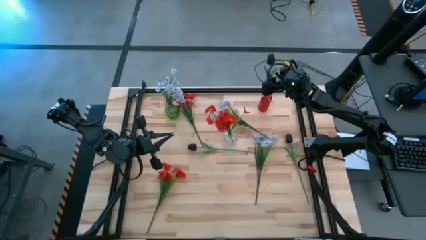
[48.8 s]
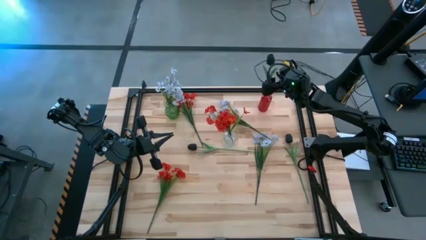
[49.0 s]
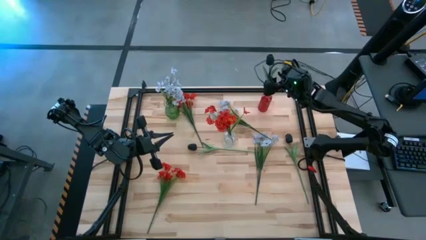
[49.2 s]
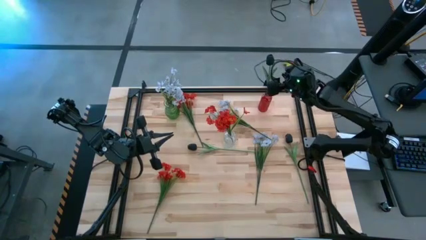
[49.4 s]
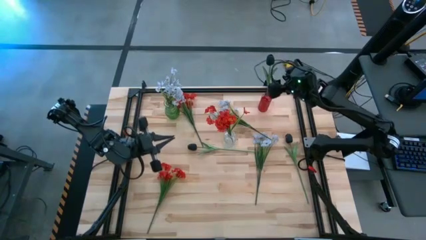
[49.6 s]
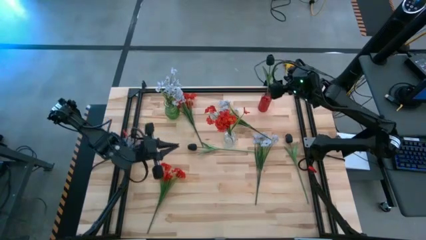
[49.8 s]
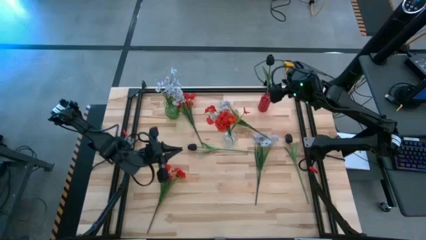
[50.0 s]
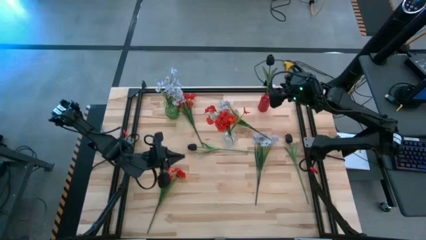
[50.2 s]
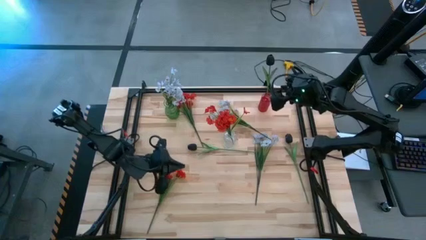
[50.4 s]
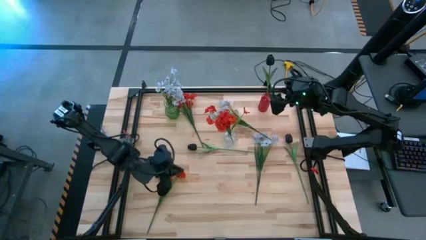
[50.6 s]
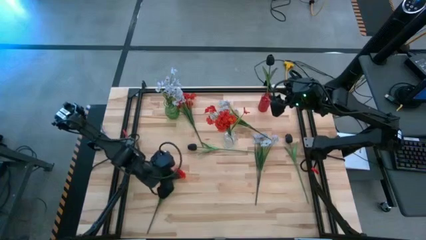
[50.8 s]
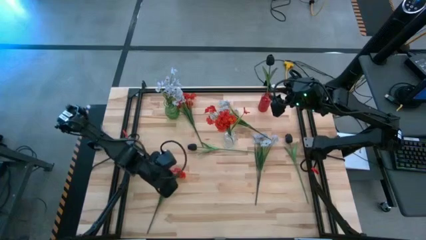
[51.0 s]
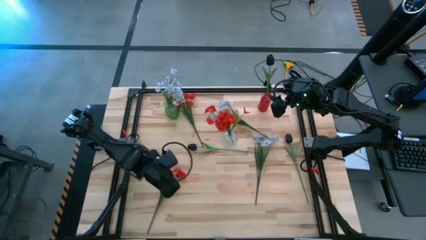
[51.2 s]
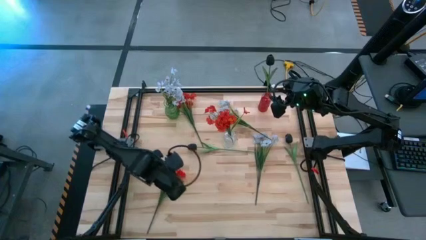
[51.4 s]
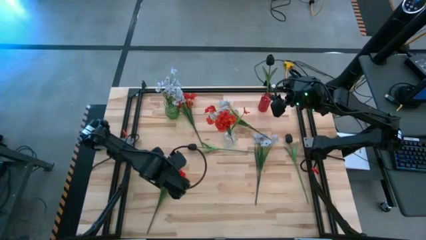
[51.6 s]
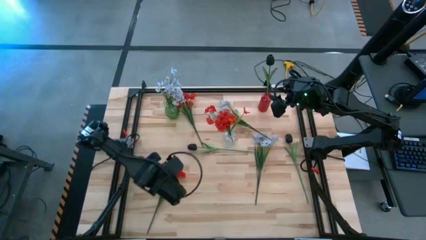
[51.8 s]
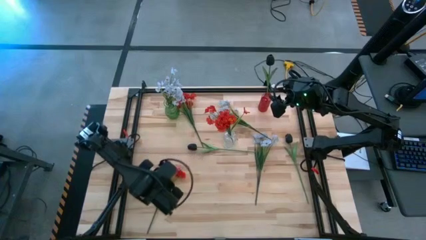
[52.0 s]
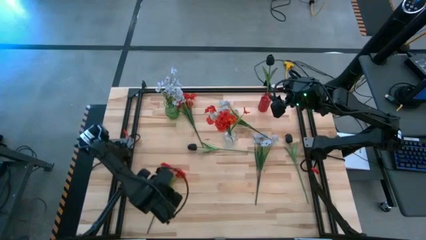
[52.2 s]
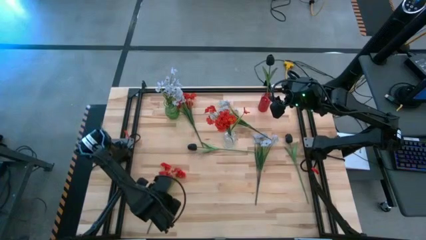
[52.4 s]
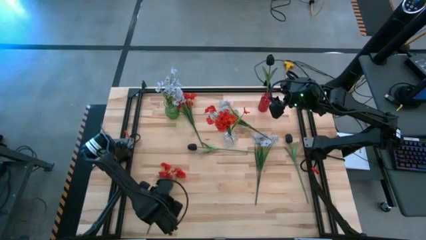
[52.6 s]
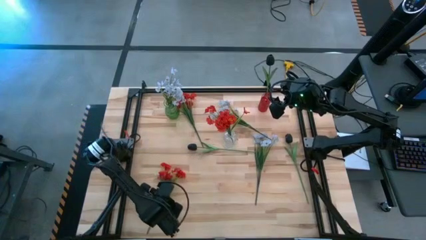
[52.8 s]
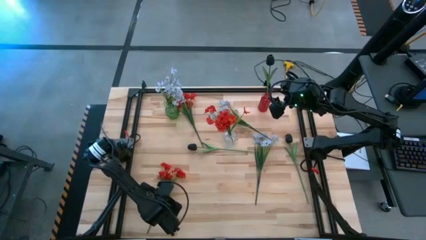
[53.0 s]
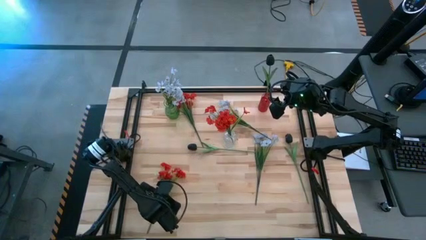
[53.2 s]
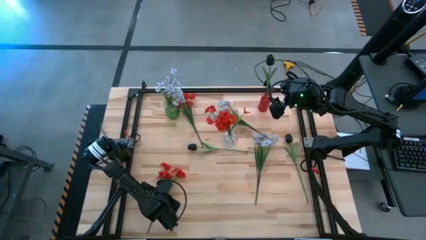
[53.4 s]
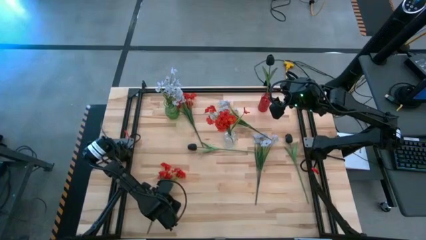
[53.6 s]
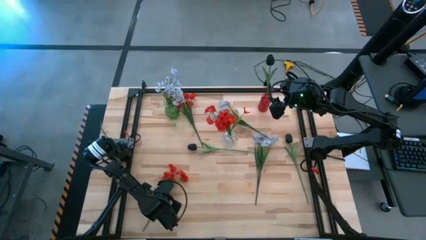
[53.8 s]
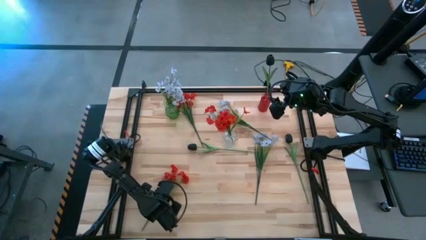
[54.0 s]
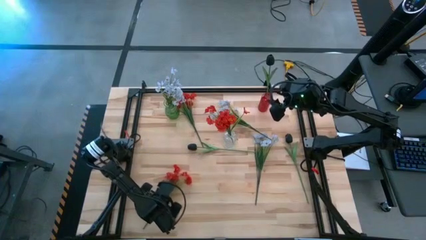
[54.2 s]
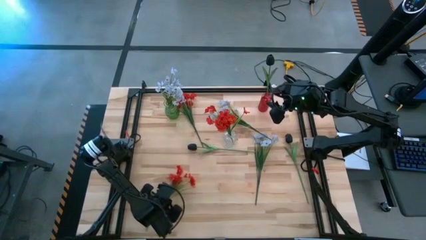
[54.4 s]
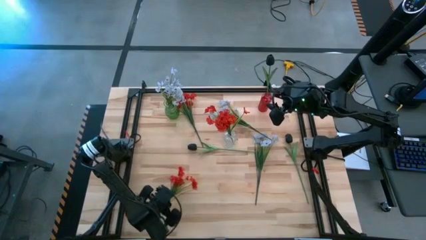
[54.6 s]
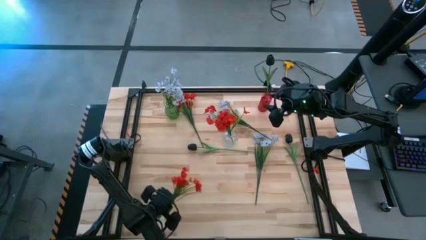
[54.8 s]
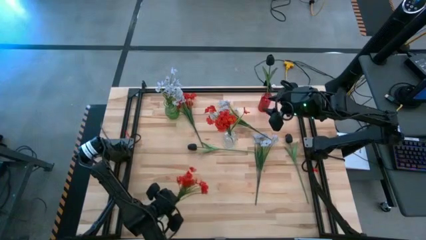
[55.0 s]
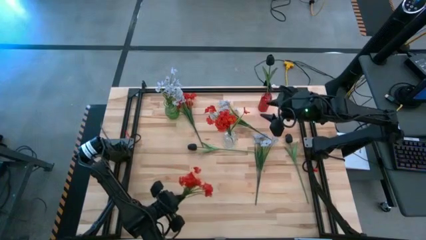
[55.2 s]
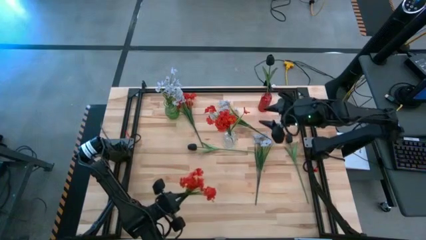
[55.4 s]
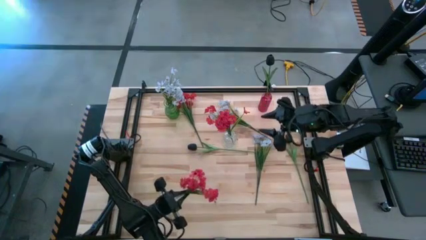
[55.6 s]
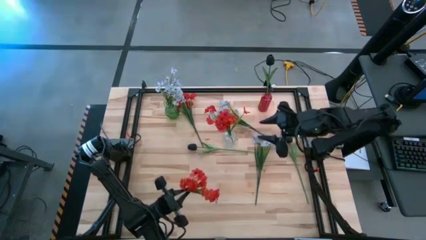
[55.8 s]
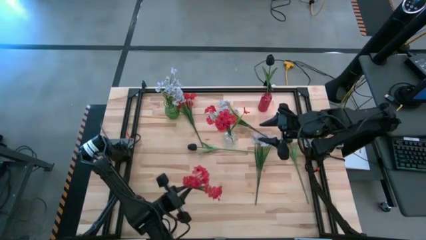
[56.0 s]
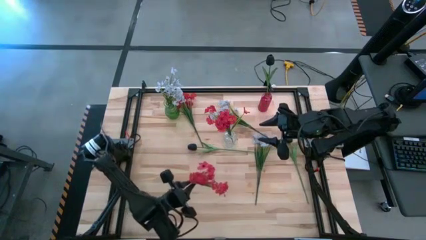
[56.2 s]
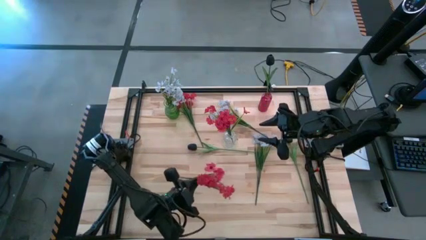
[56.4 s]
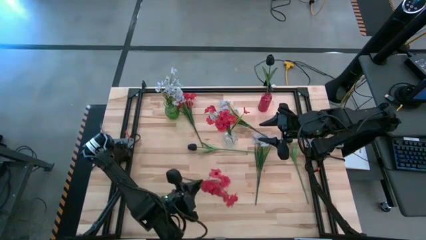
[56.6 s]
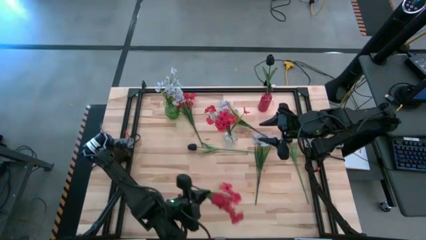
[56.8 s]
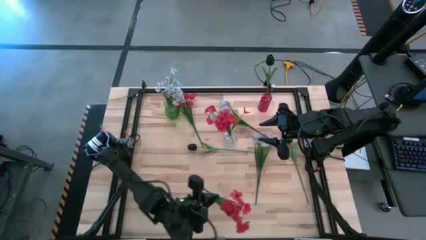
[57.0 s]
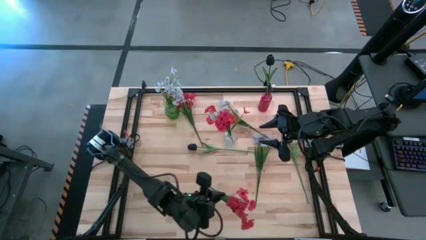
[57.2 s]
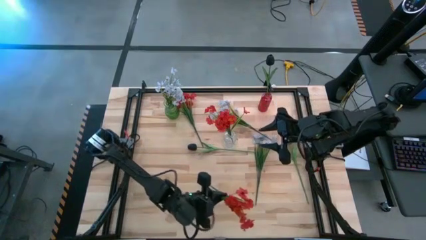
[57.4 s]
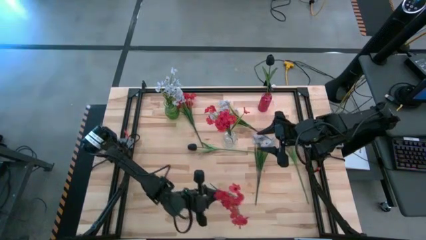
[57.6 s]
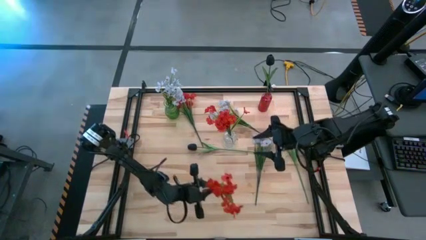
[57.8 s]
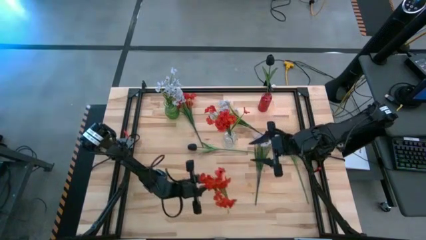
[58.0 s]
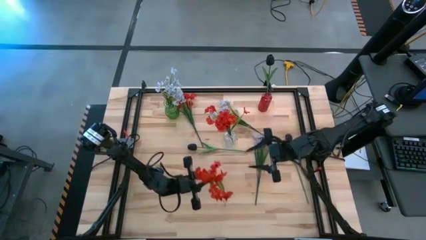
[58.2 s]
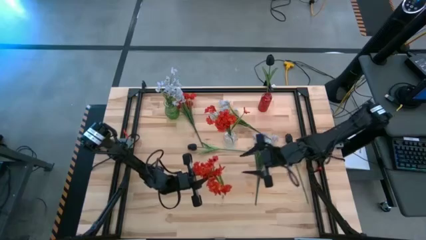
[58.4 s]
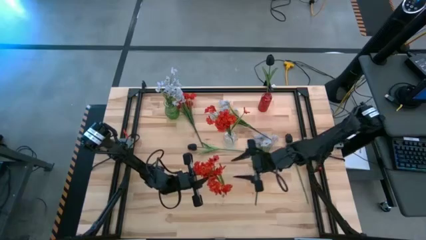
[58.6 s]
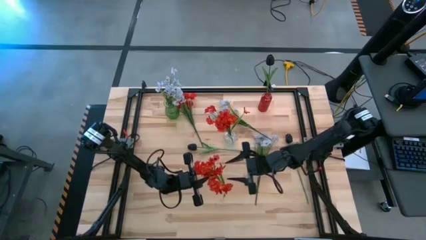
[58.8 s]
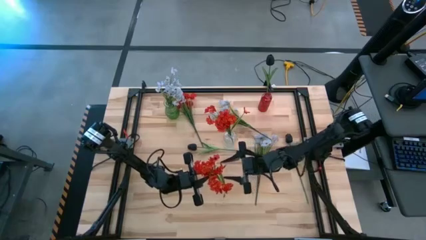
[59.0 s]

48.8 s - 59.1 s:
Task: Sort flowers into vase by color
Put the bottom red flower into the transparent vase
